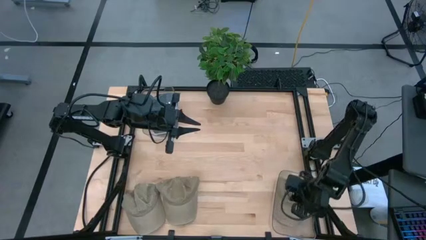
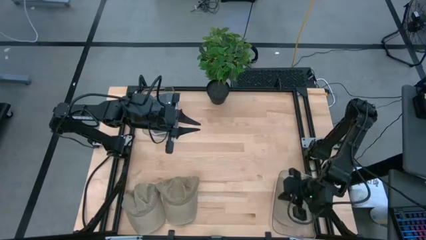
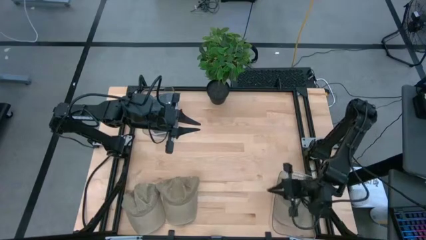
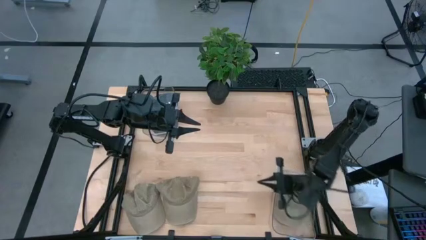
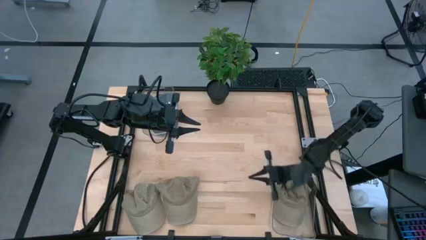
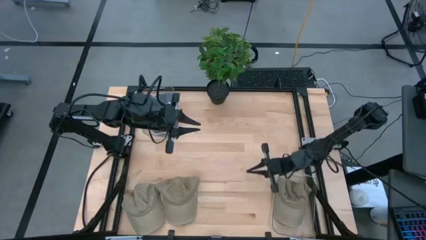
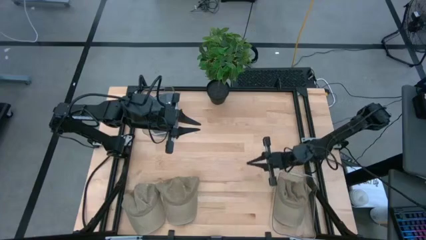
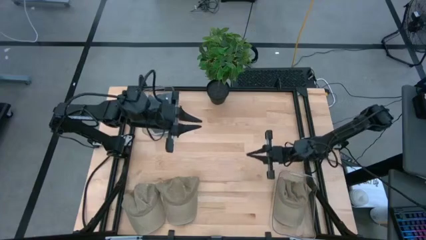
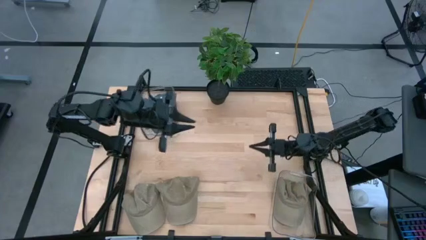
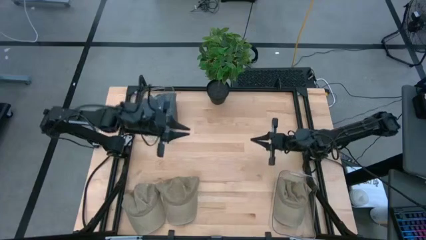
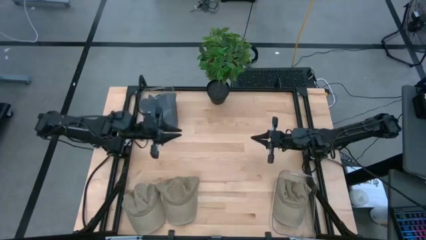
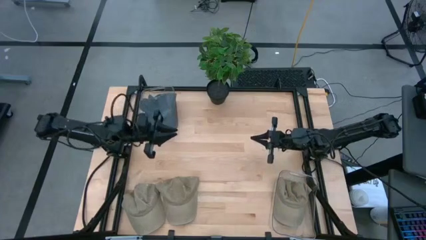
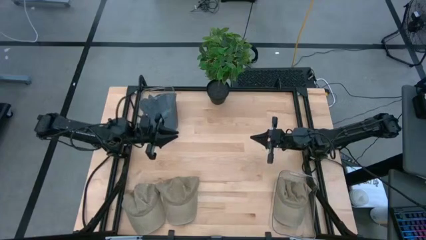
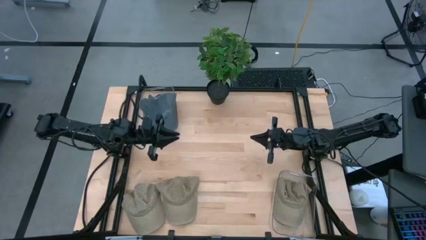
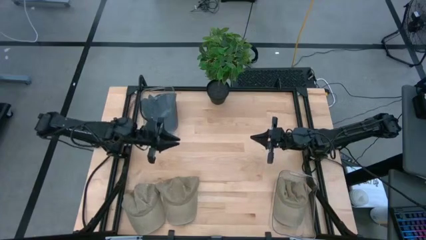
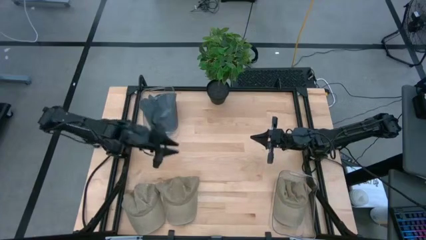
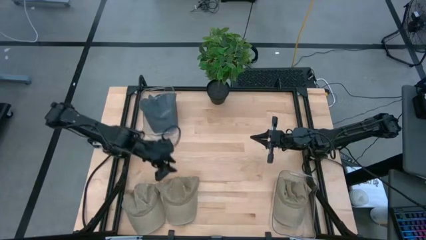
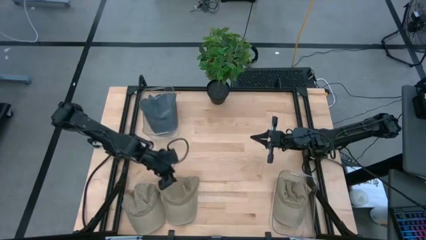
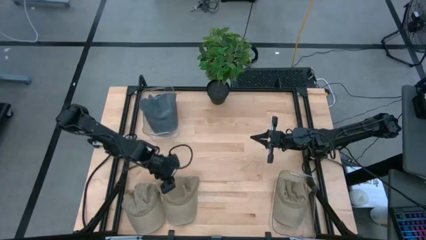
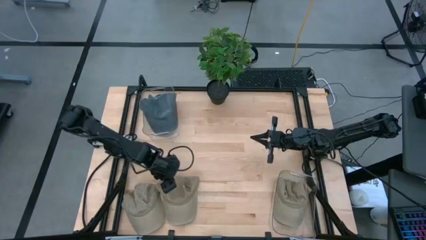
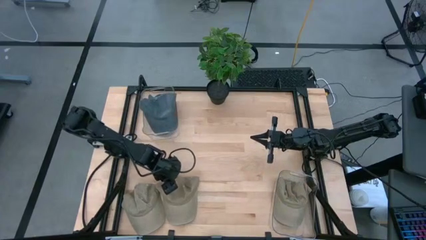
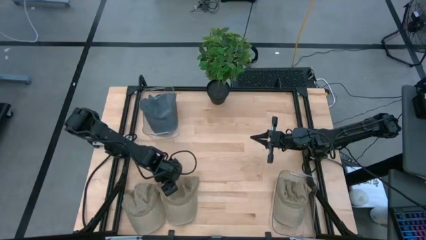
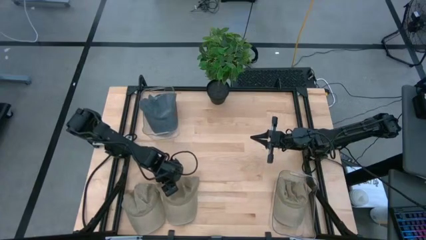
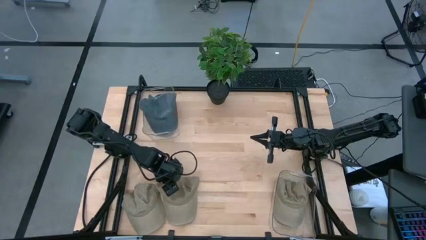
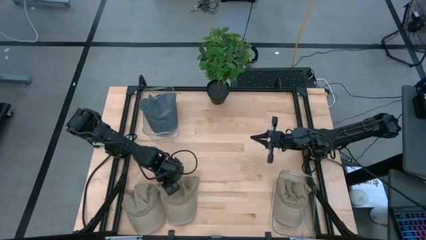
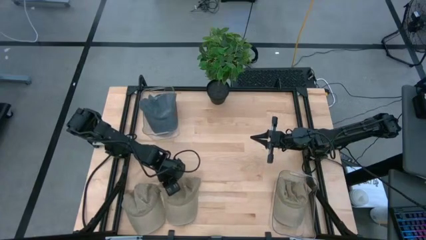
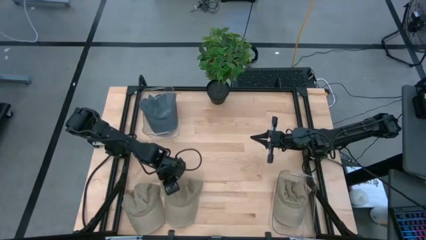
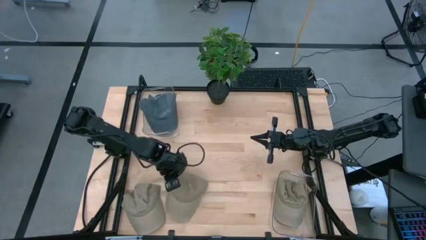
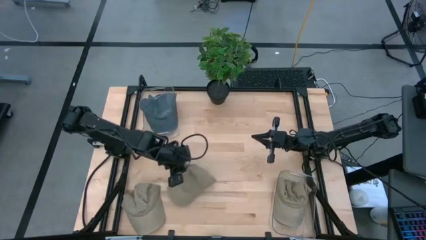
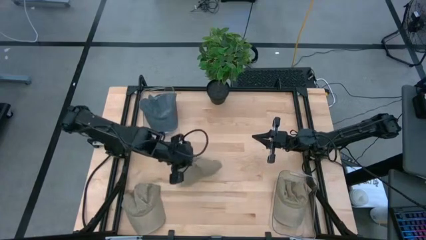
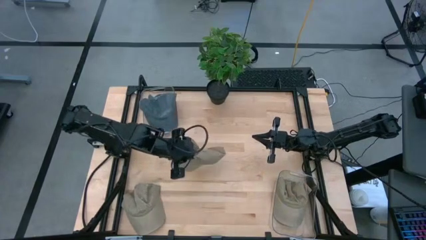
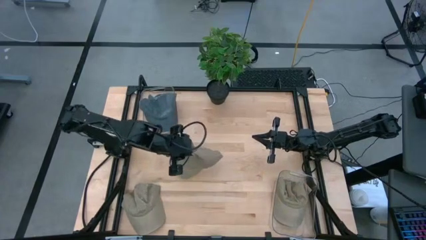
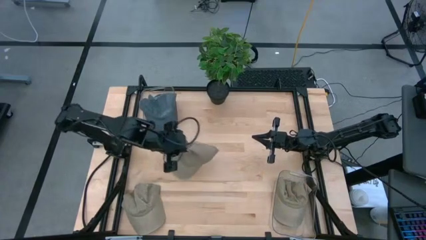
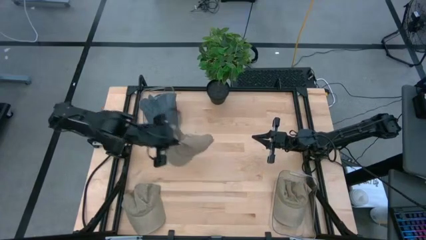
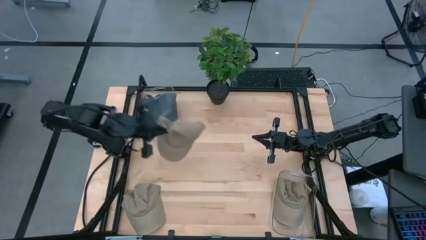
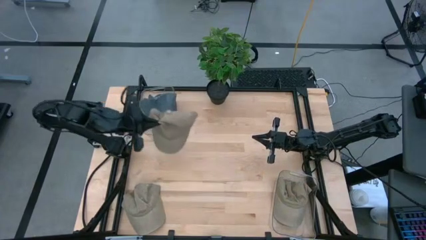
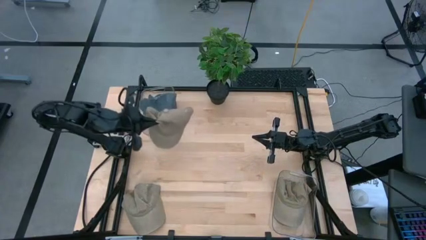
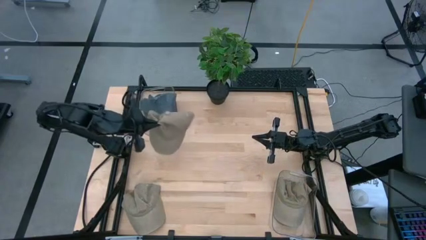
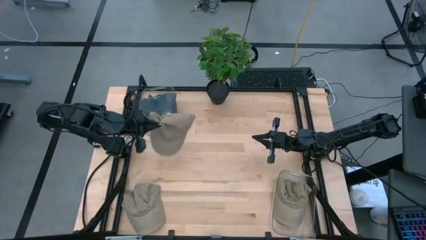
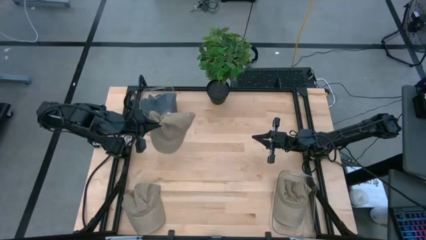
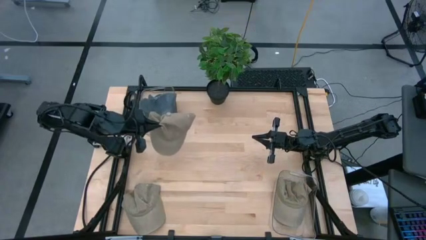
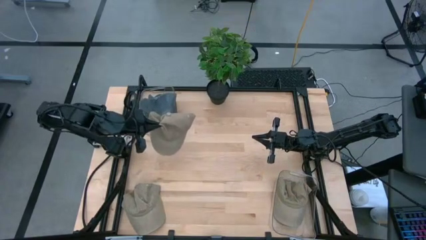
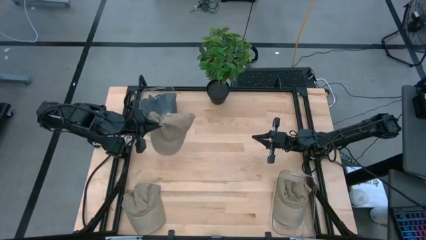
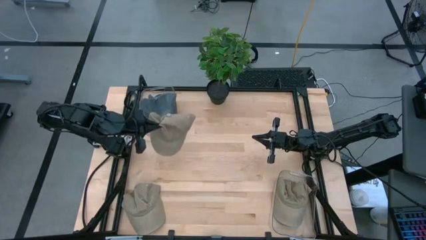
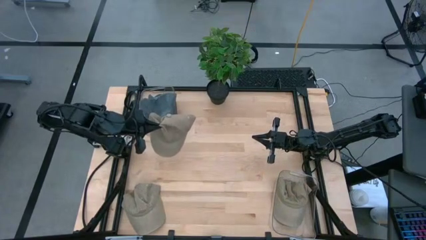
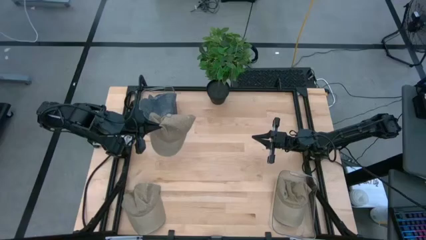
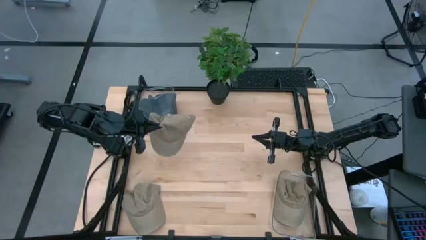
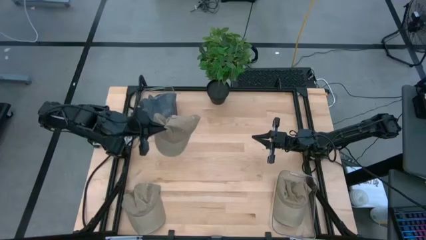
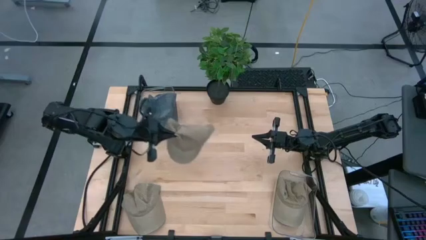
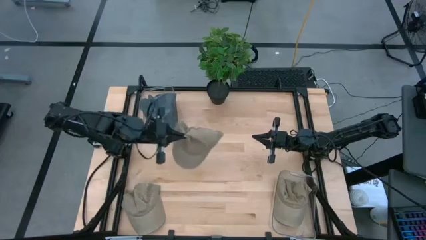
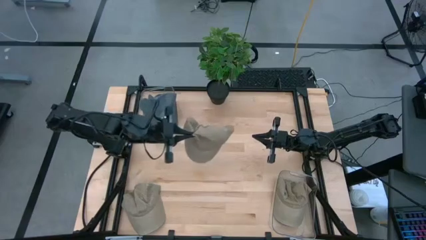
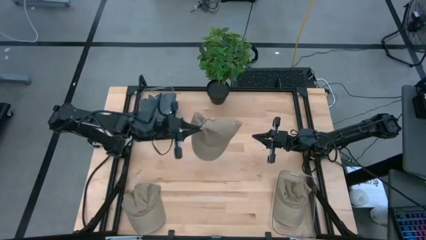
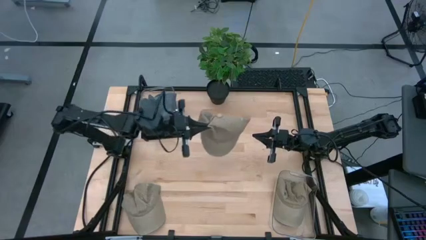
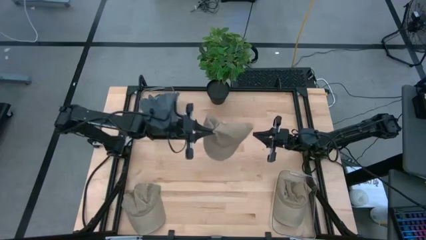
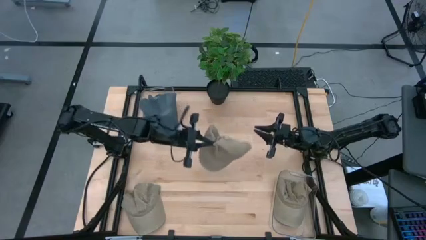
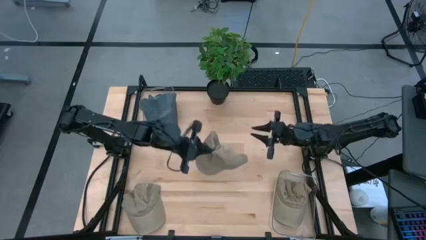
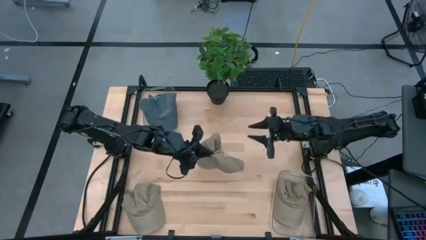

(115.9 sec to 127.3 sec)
Task: Pick & Place hat
Put the right brown cap into the right transparent bin

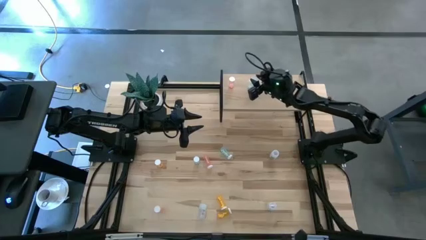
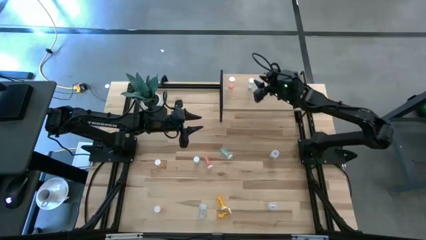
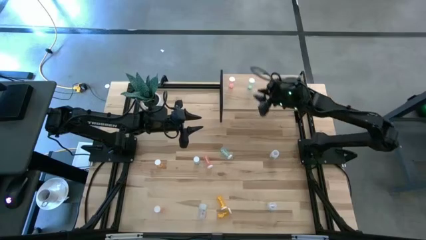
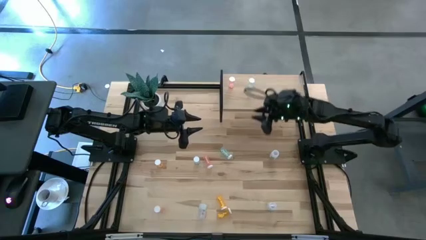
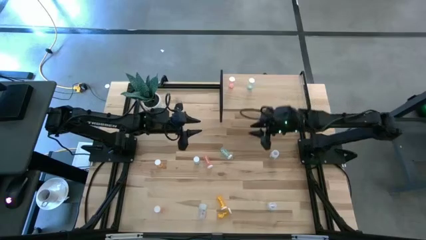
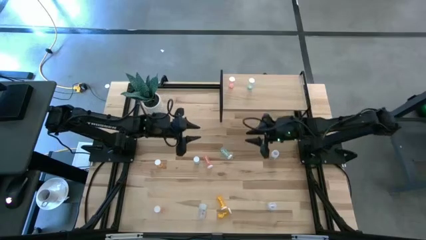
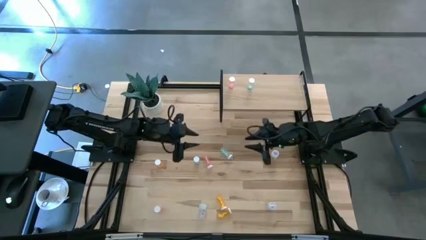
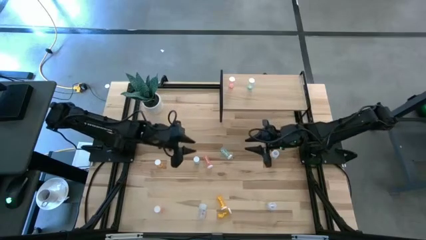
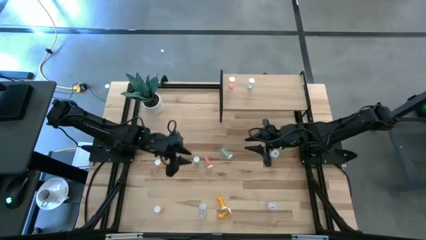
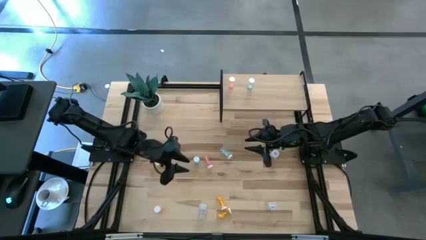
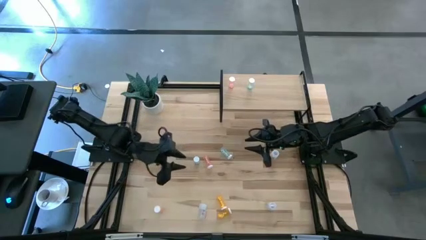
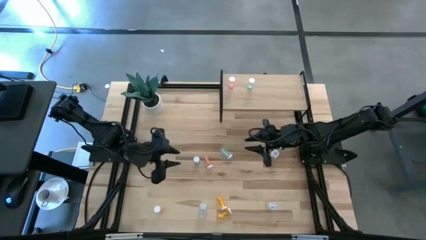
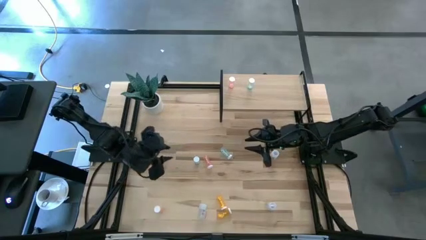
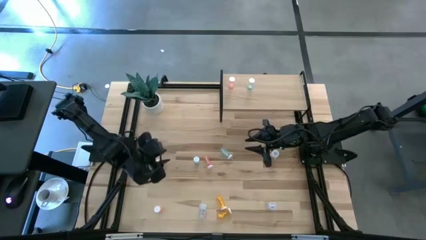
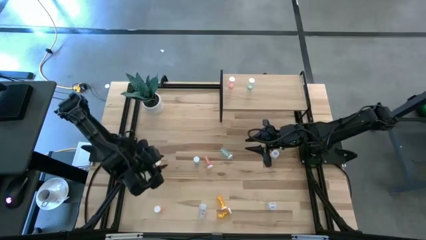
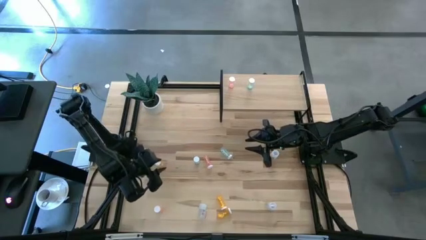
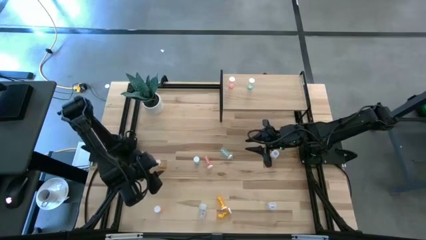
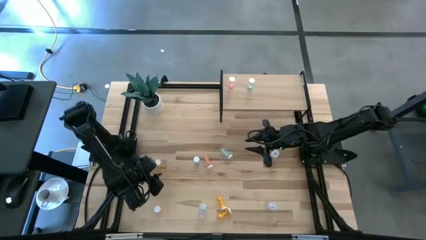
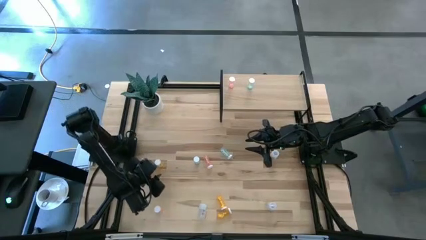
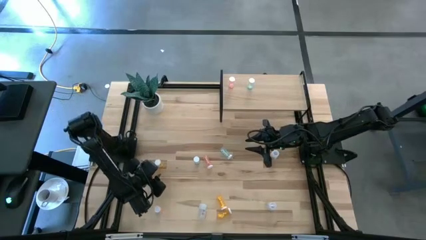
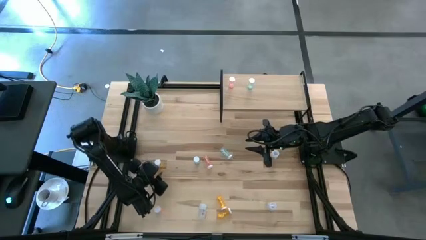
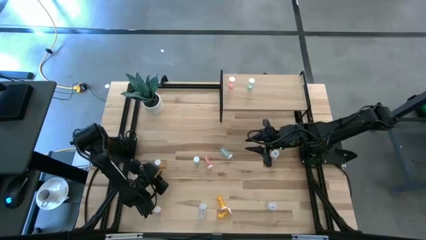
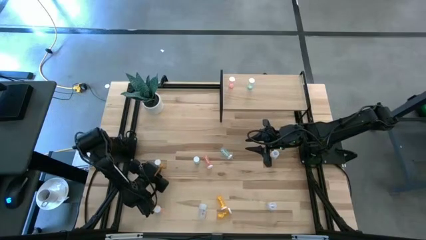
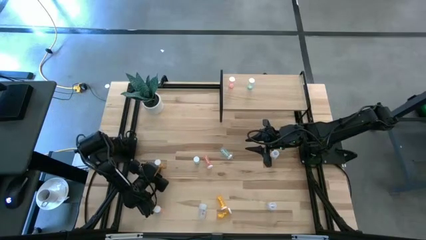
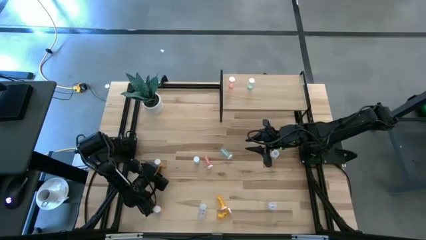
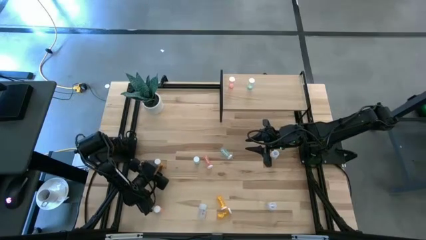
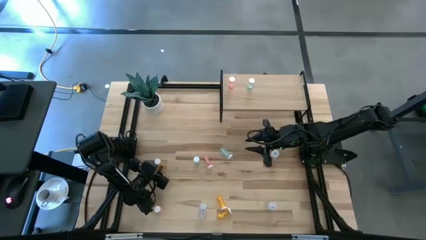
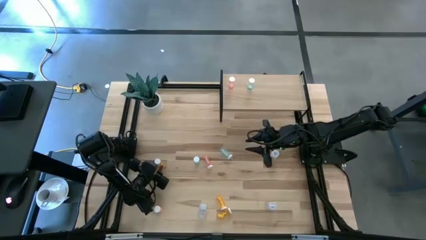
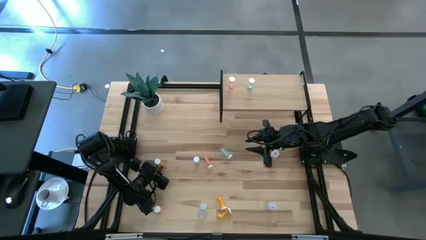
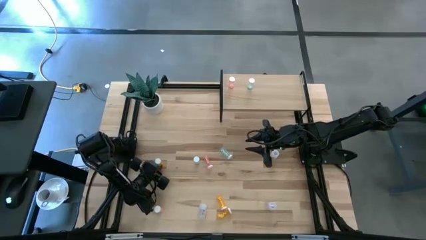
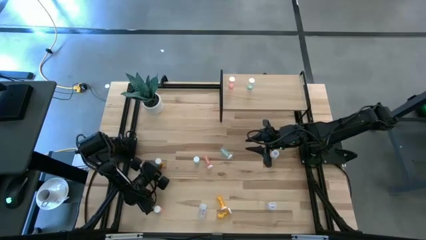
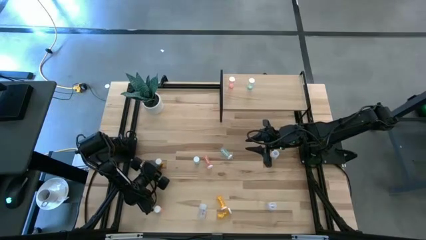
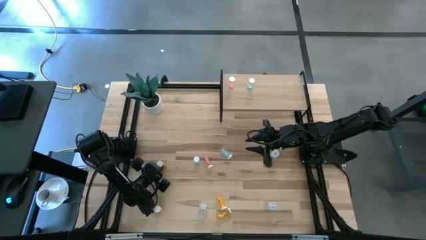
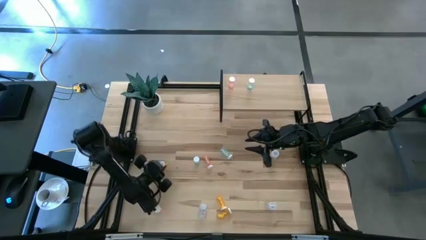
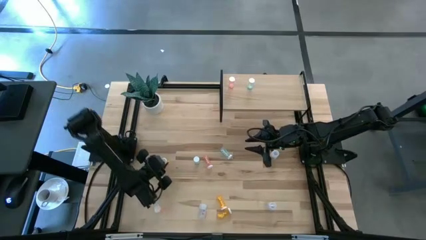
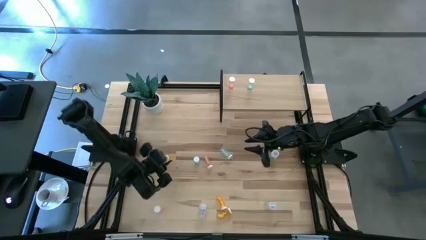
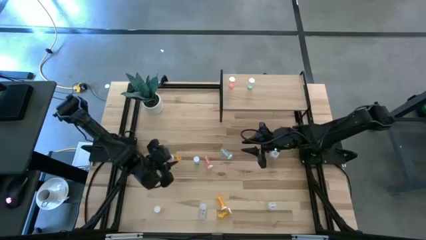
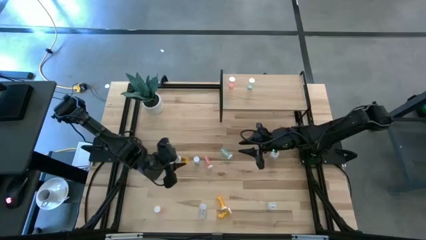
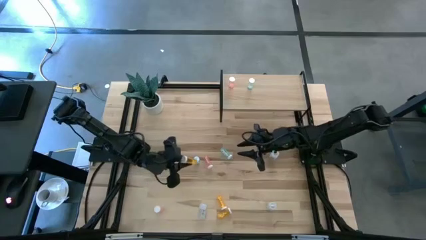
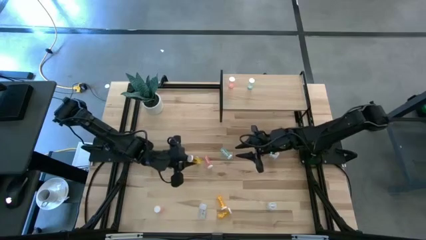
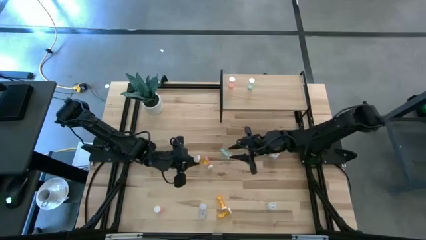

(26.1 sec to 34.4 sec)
Task: Pick and place medicine bottles onto shelf by color
Put the top orange pill bottle on the shelf
